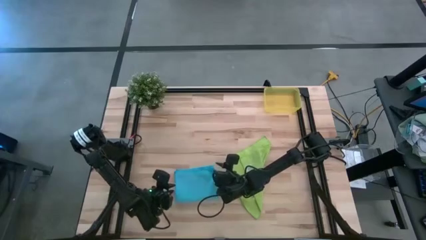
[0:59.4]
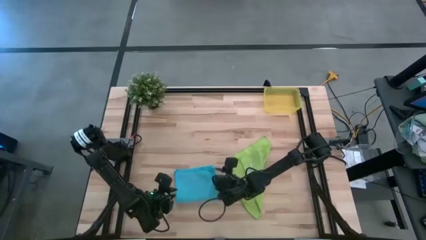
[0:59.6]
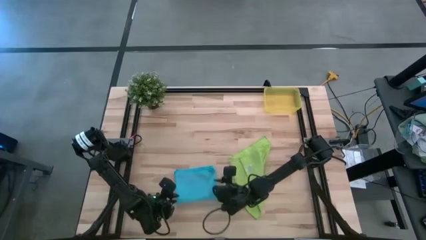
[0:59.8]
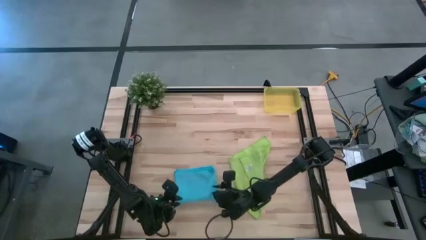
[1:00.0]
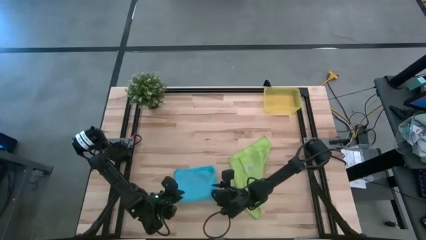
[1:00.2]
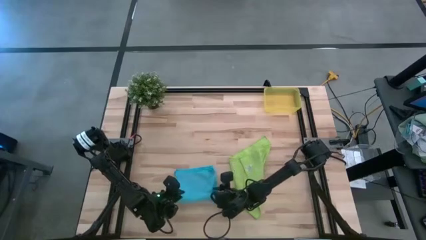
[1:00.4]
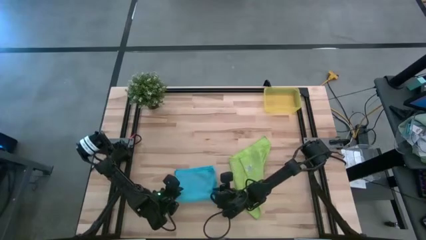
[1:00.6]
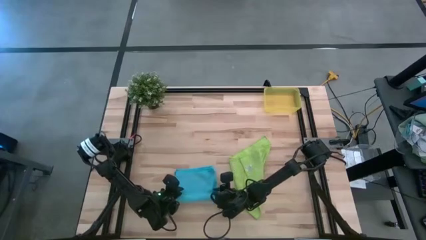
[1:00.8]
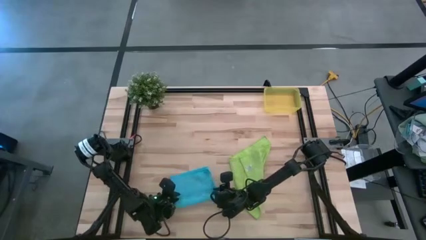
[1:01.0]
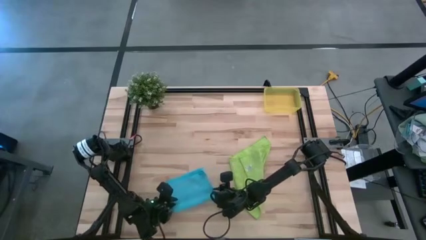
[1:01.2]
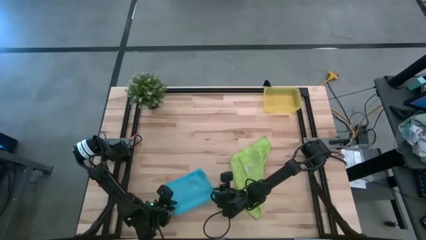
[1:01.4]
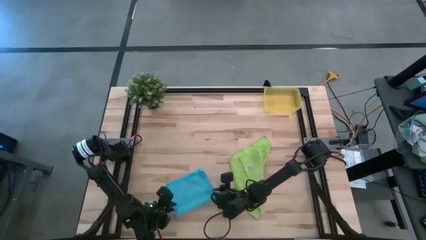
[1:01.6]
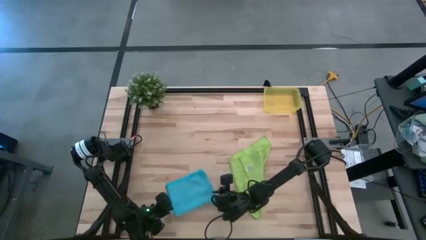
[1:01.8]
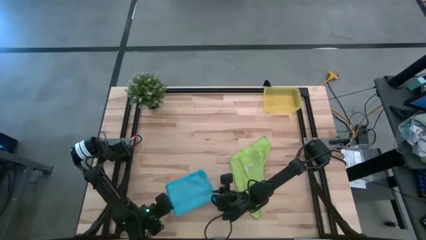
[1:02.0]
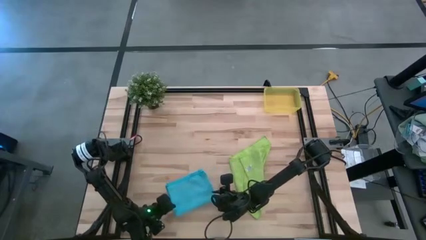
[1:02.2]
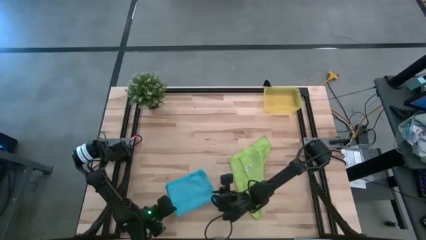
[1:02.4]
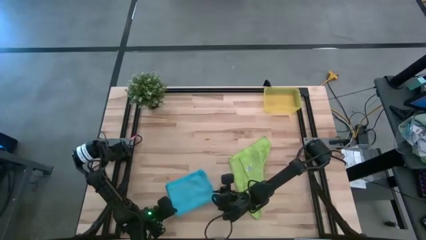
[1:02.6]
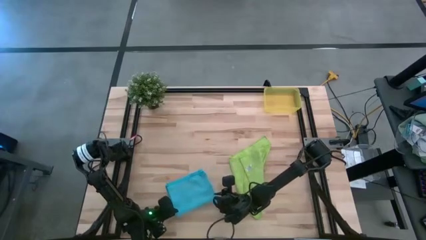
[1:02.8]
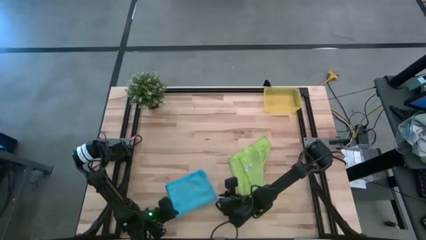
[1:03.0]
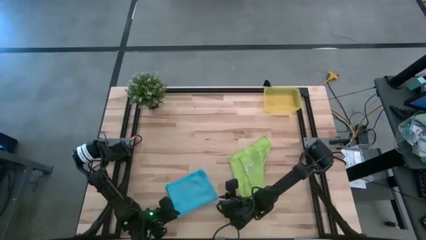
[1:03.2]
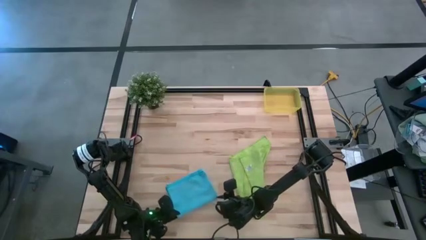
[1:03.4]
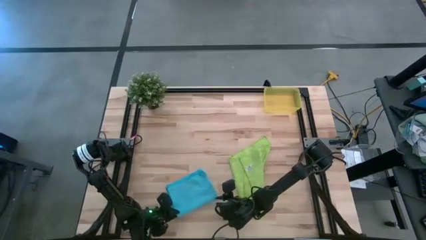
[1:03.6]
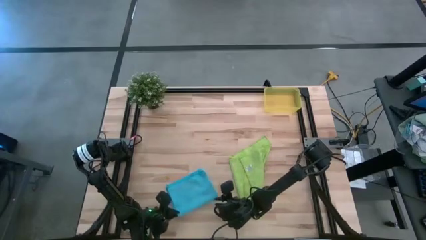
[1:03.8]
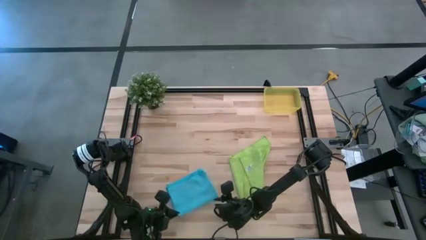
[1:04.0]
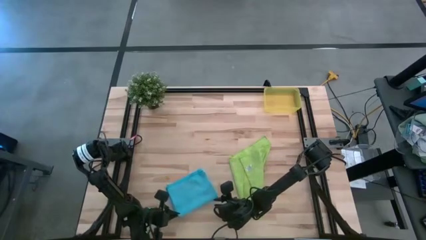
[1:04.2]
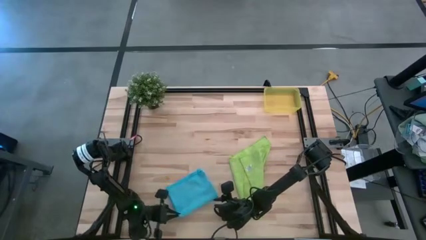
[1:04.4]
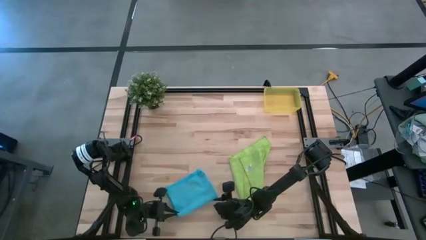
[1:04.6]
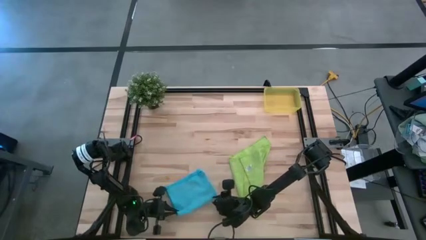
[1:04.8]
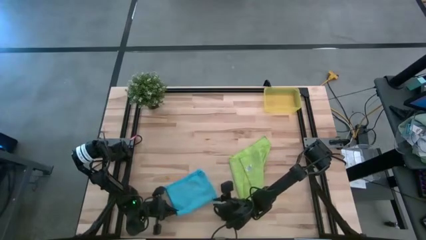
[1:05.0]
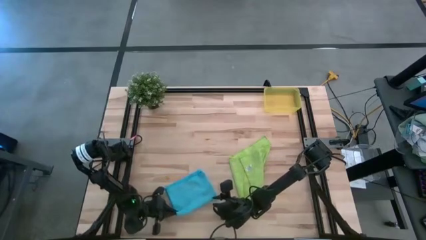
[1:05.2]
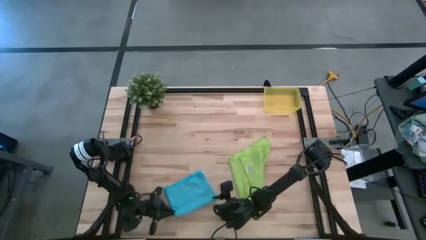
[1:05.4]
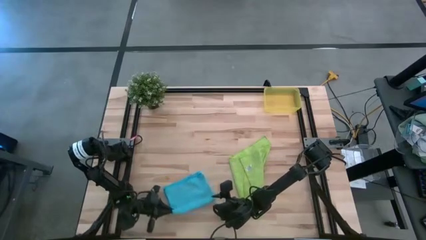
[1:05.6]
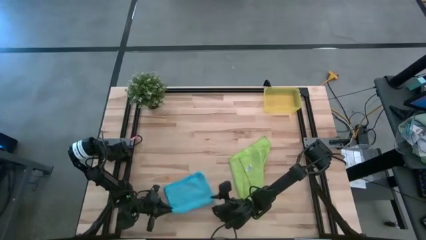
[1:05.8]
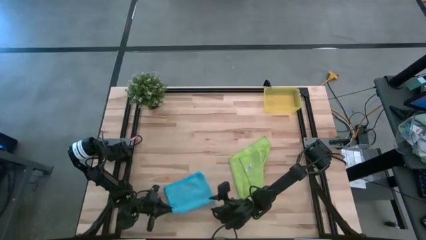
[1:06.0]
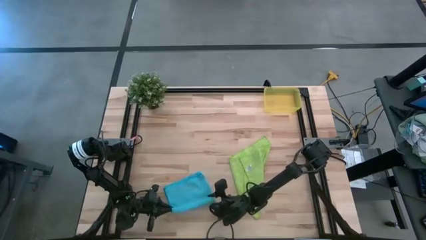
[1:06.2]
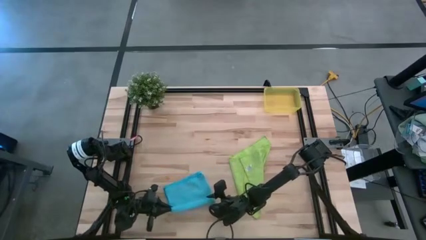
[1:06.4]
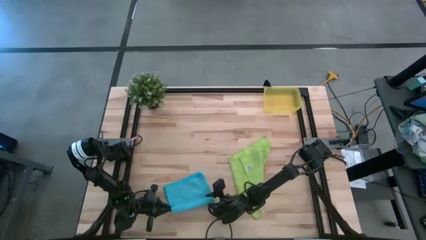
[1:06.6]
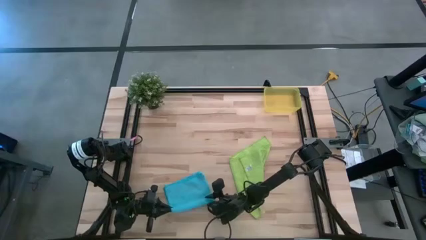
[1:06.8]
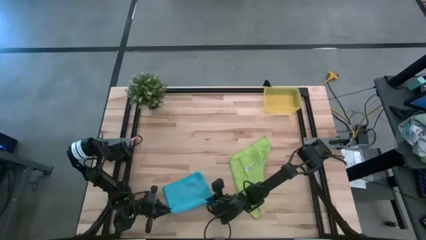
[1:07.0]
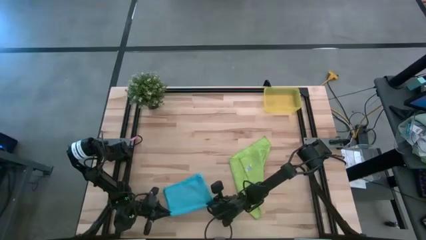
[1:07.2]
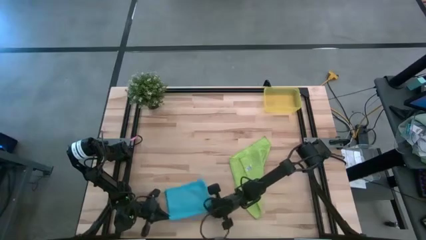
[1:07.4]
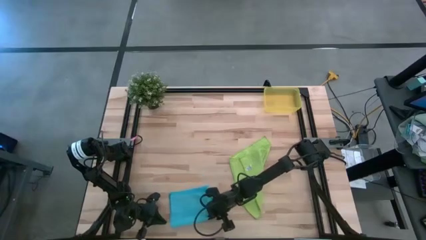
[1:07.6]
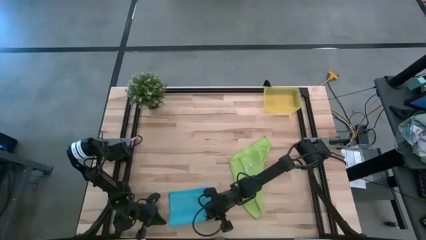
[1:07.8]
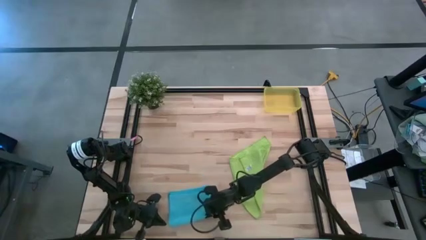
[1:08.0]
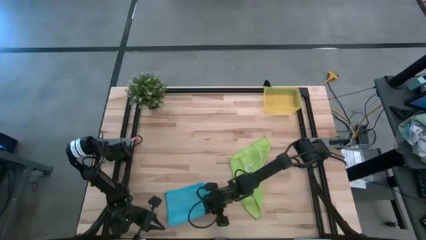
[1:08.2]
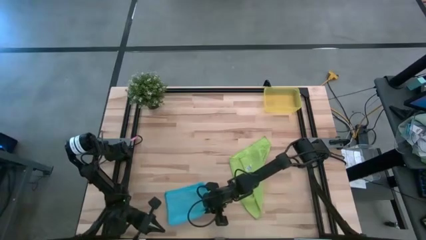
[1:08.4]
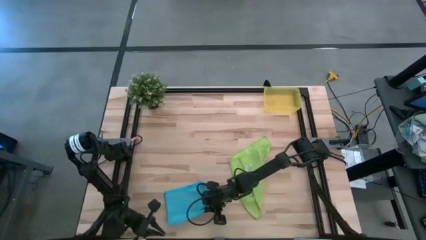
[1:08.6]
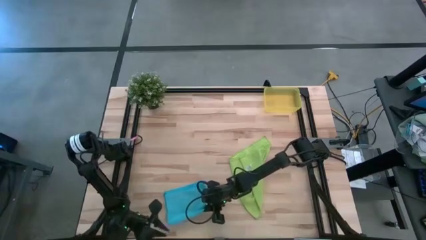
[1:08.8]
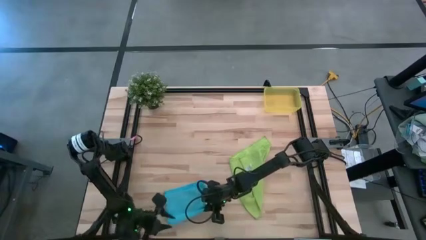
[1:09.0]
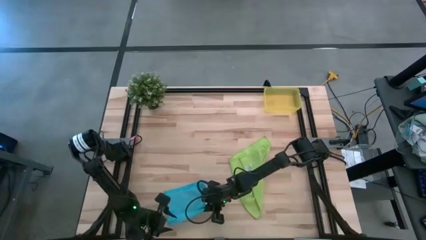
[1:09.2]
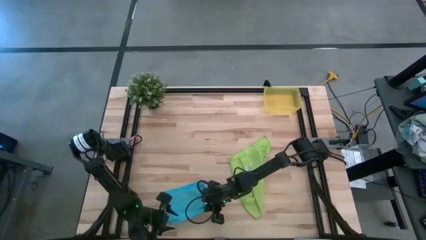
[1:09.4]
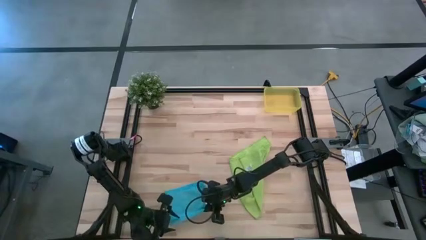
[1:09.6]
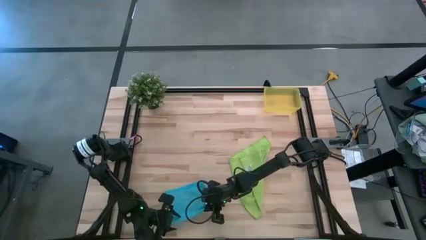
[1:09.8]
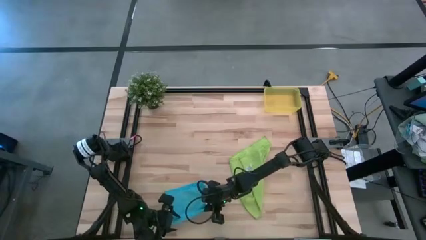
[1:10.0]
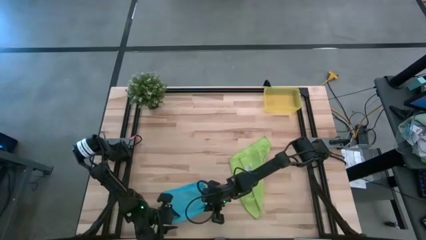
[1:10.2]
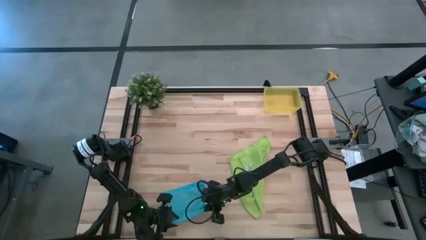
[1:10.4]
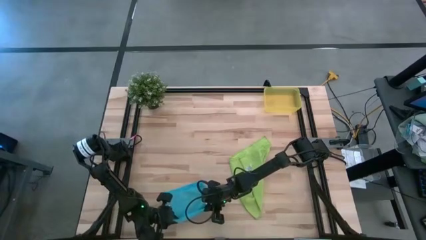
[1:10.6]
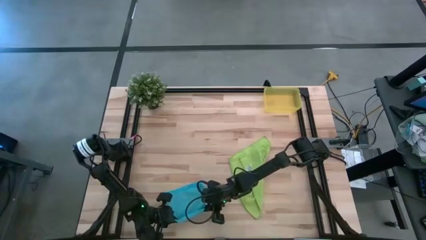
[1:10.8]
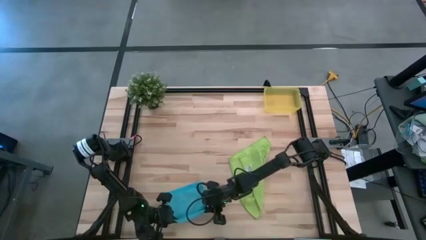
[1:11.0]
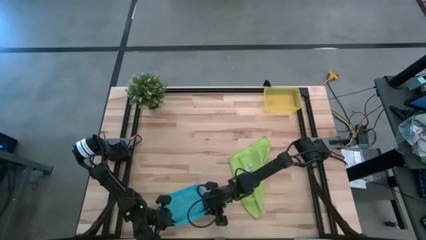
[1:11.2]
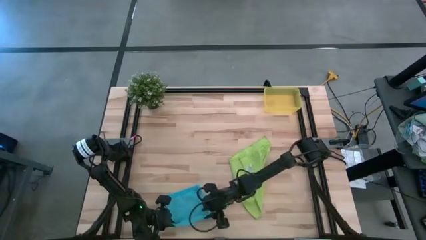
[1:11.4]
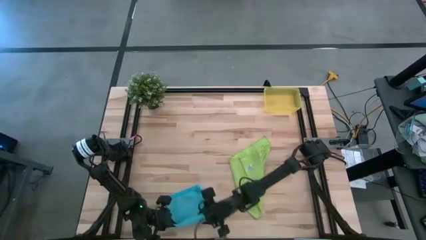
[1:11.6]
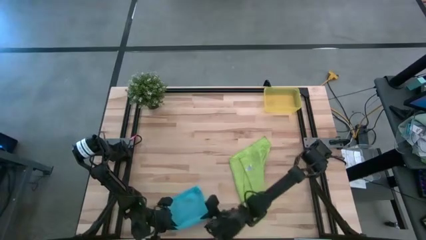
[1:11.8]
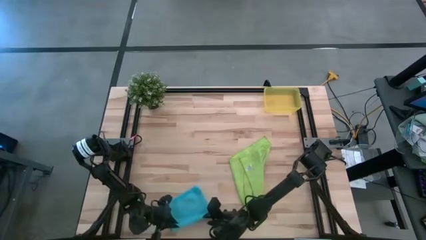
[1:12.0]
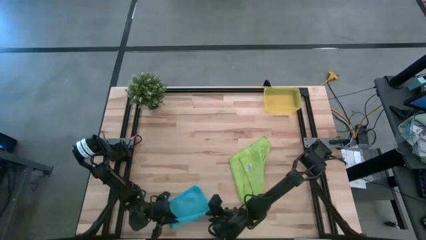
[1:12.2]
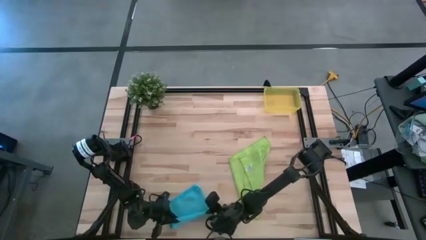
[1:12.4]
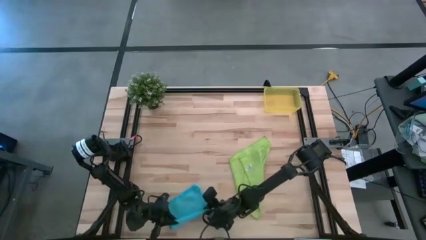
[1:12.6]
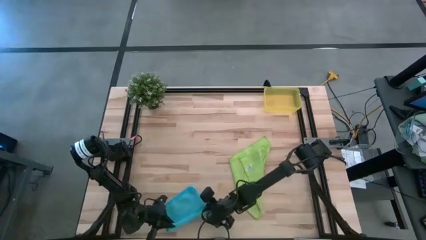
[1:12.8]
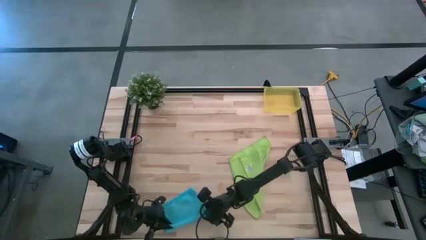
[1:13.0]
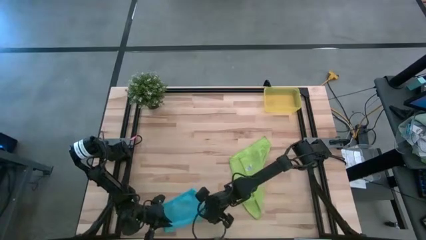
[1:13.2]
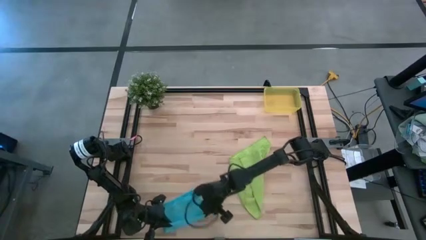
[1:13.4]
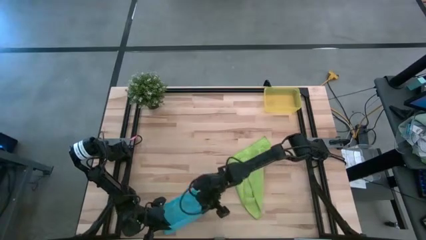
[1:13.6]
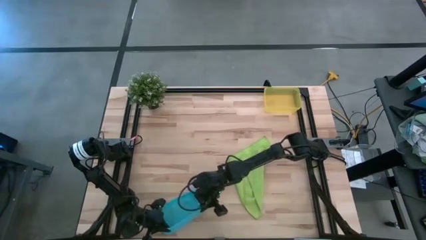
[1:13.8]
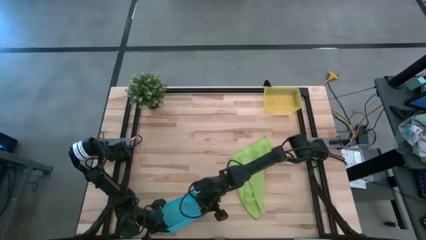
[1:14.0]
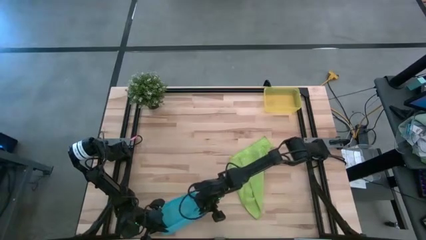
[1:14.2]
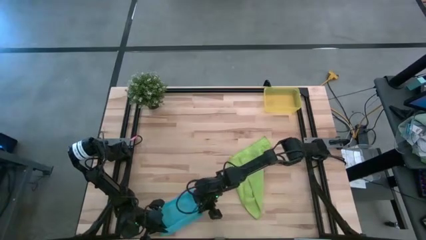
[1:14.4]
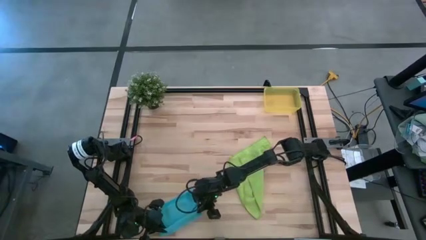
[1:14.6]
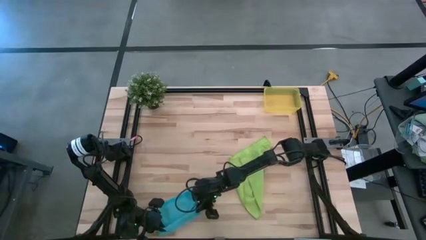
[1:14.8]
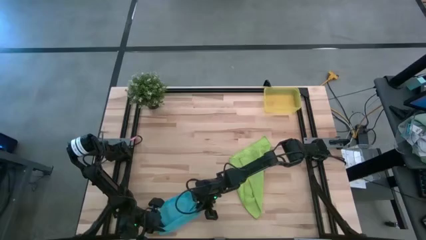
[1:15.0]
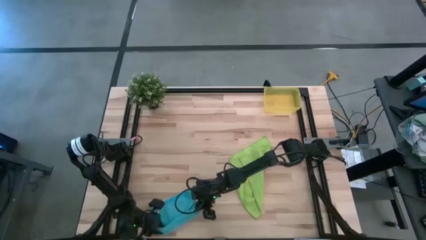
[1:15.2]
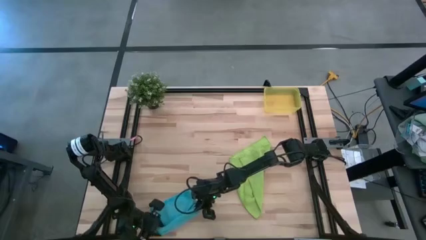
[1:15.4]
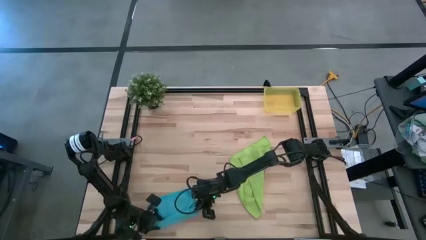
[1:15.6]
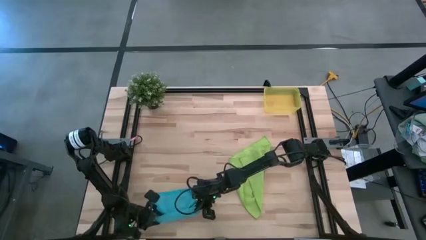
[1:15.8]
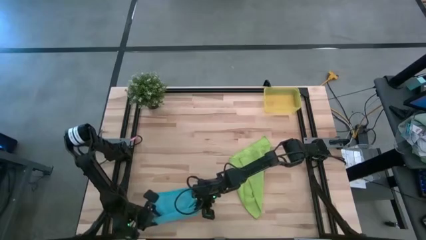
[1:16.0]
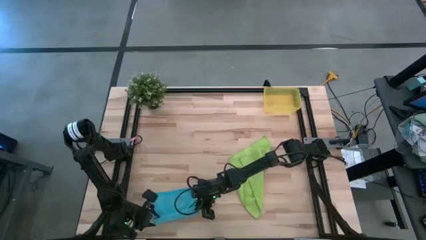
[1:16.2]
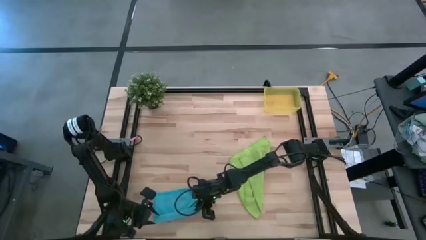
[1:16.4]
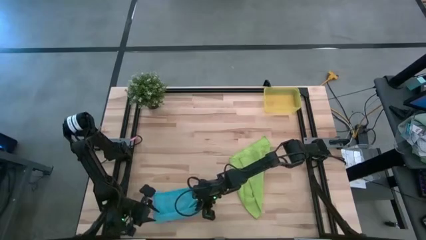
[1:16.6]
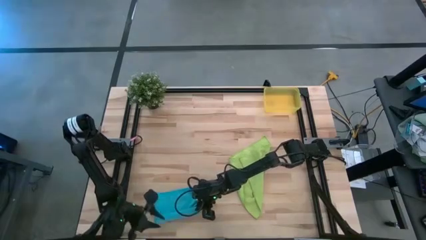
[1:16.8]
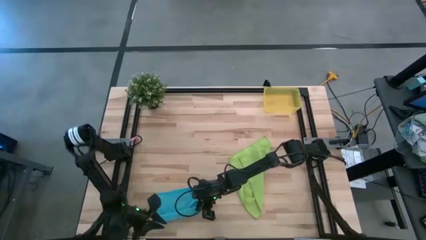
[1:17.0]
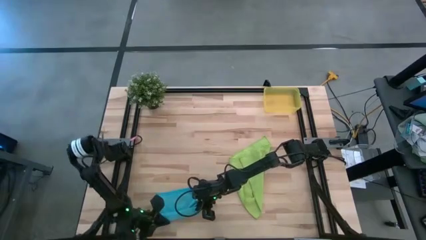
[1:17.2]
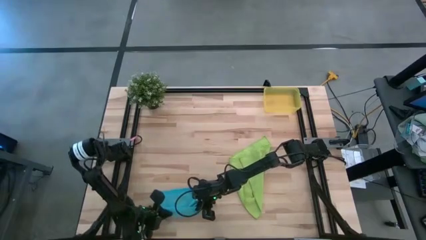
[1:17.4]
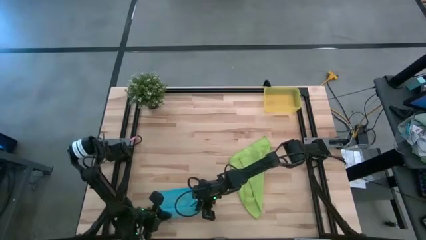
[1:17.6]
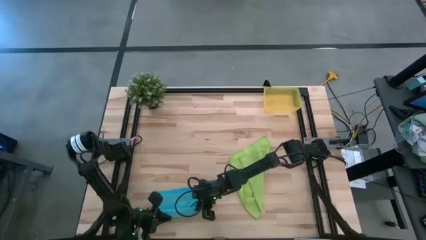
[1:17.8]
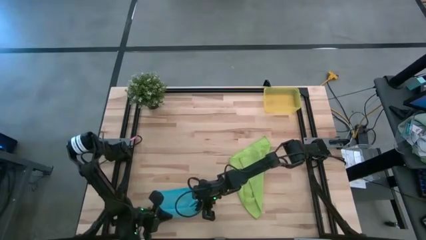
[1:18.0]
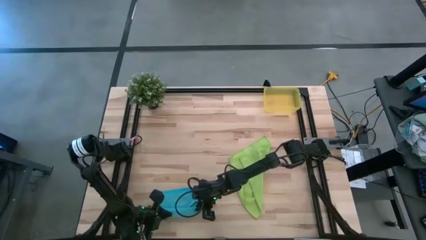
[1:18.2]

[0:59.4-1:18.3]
Task: Roll microfiber towels into tight, uniform cylinder then place into a basket
Roll the blue microfiber towel
